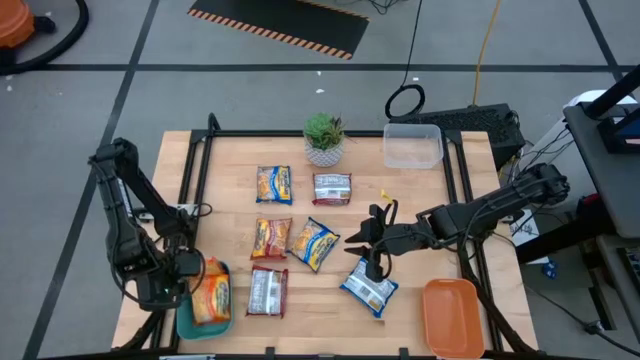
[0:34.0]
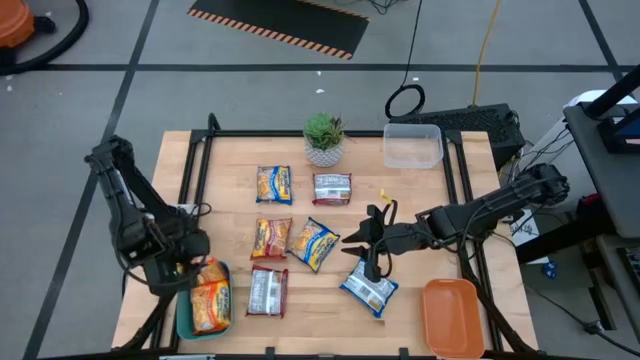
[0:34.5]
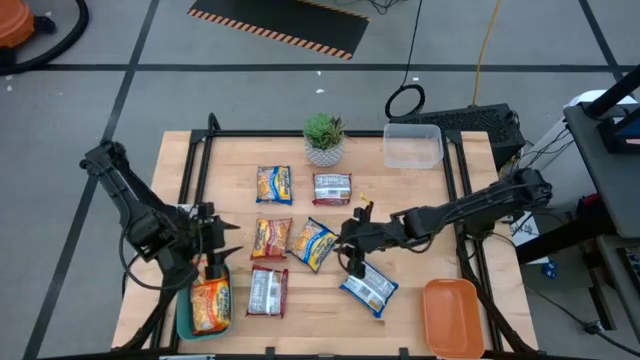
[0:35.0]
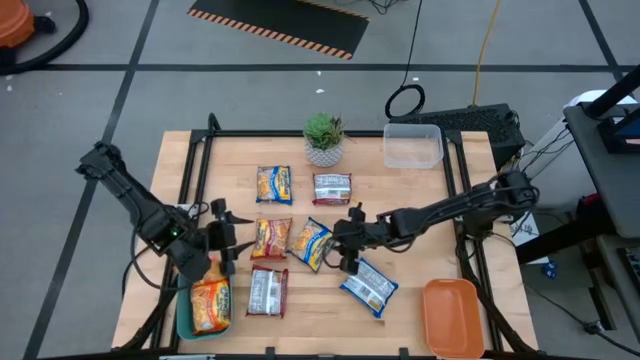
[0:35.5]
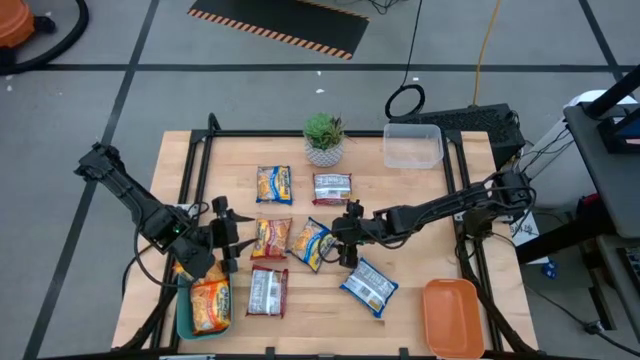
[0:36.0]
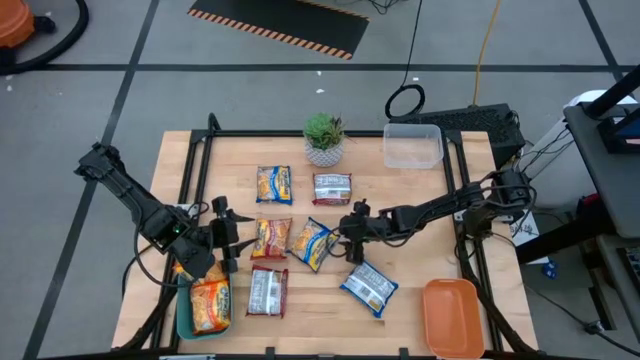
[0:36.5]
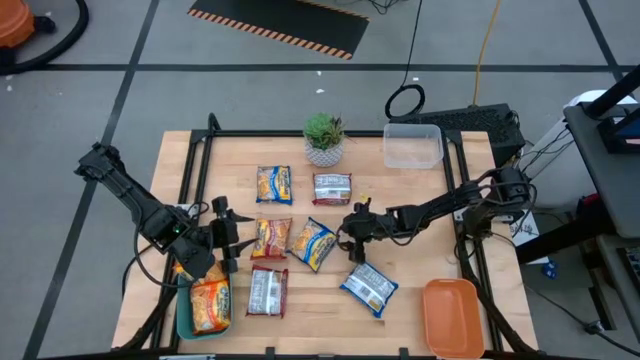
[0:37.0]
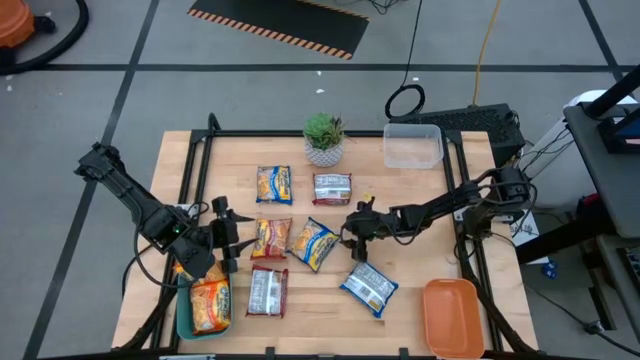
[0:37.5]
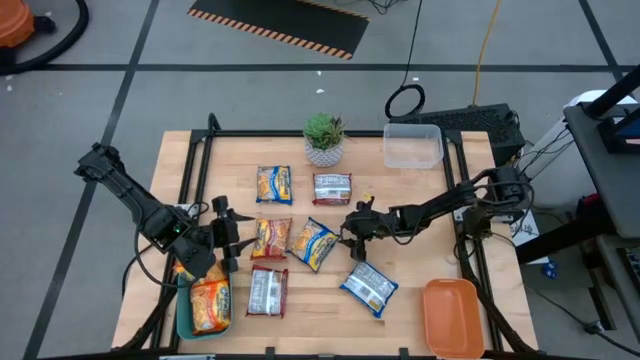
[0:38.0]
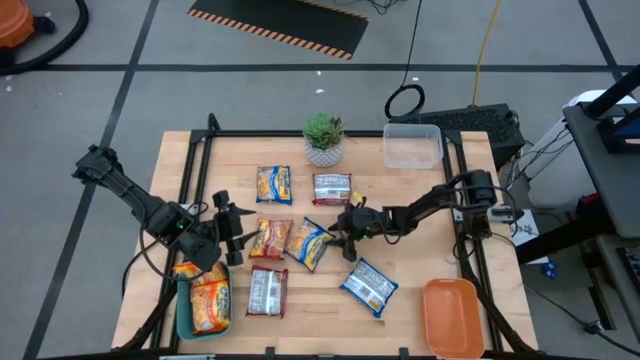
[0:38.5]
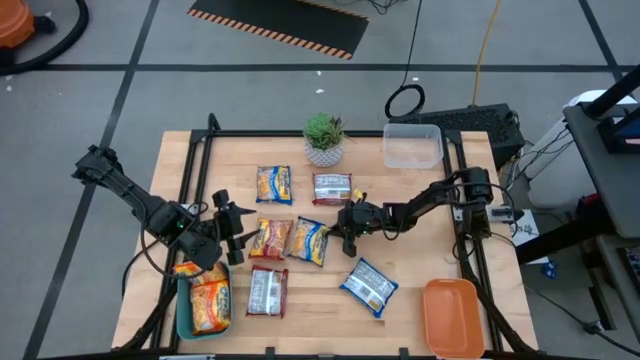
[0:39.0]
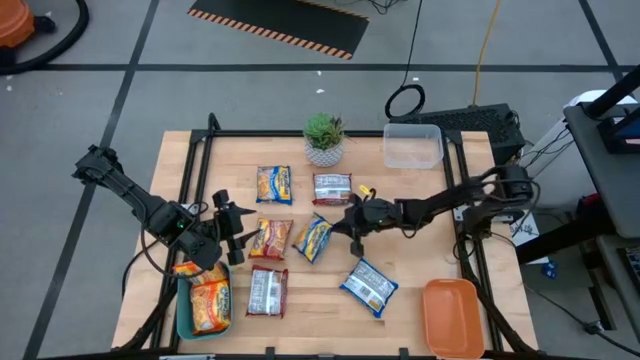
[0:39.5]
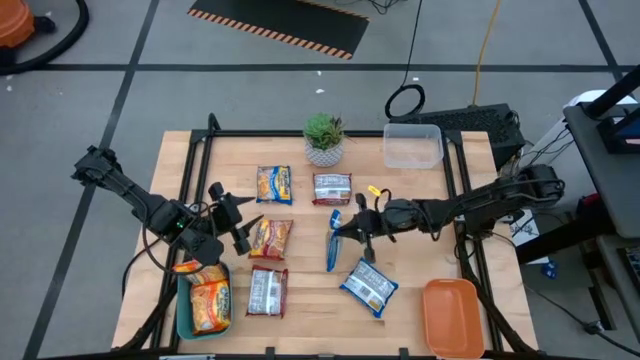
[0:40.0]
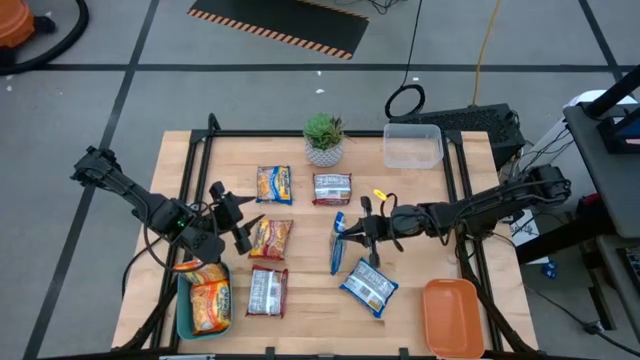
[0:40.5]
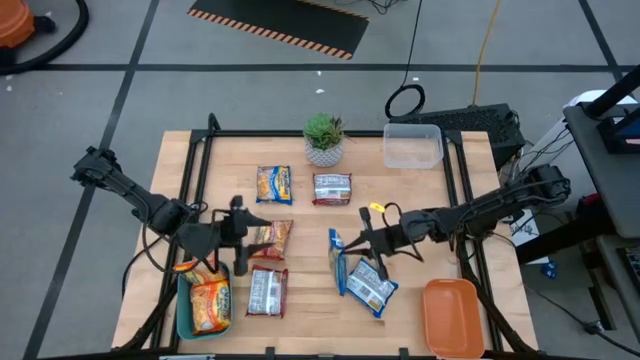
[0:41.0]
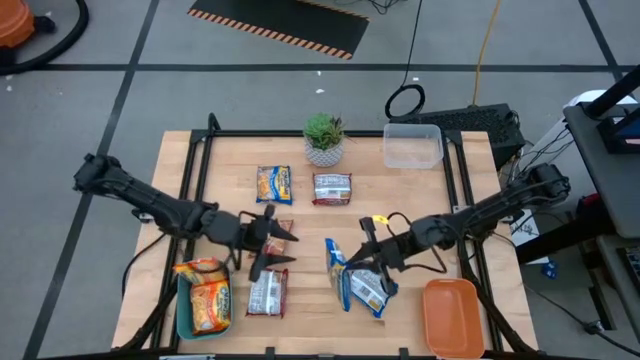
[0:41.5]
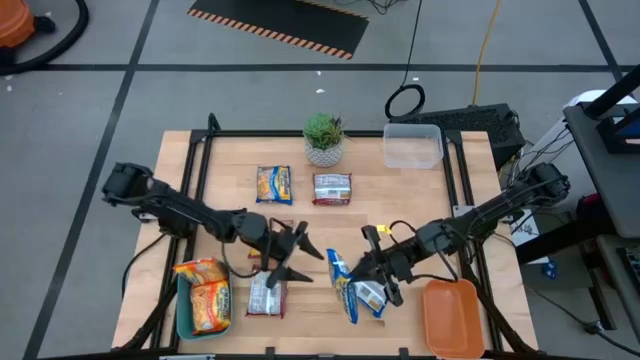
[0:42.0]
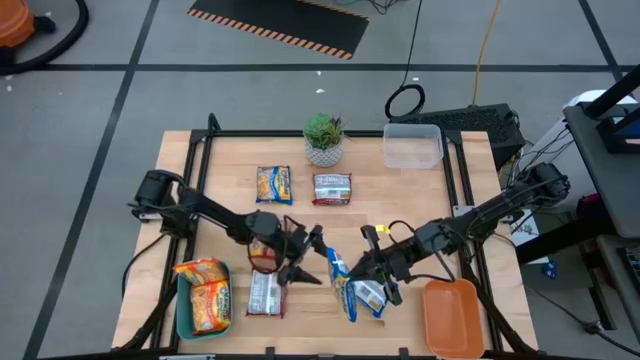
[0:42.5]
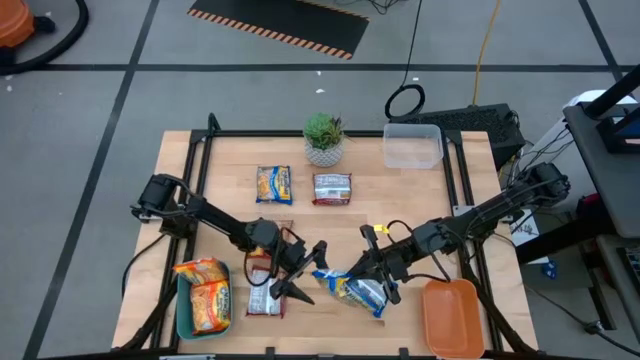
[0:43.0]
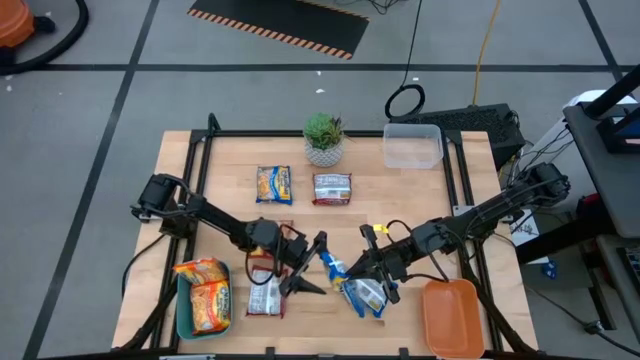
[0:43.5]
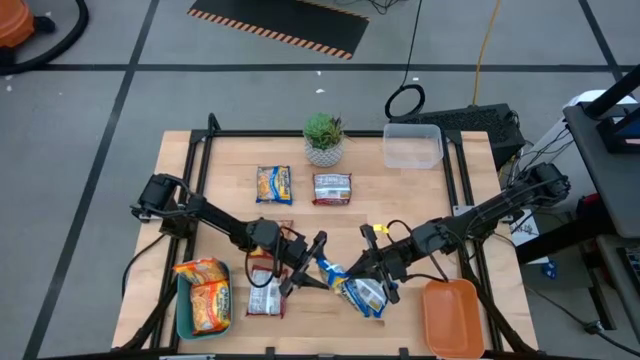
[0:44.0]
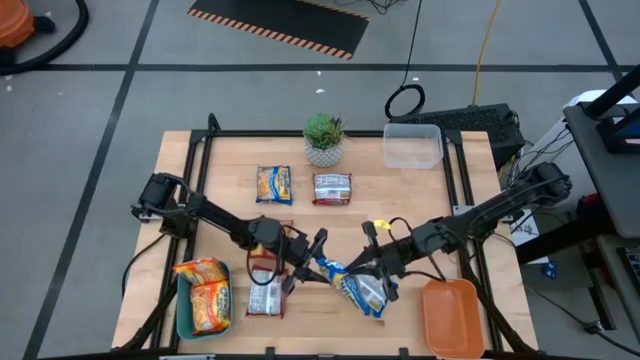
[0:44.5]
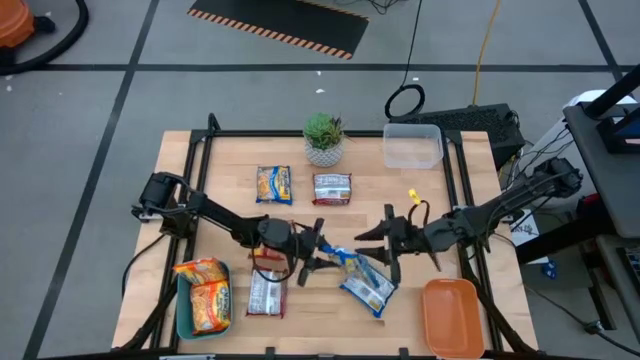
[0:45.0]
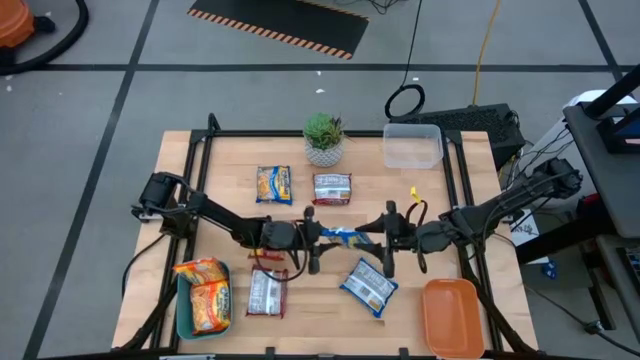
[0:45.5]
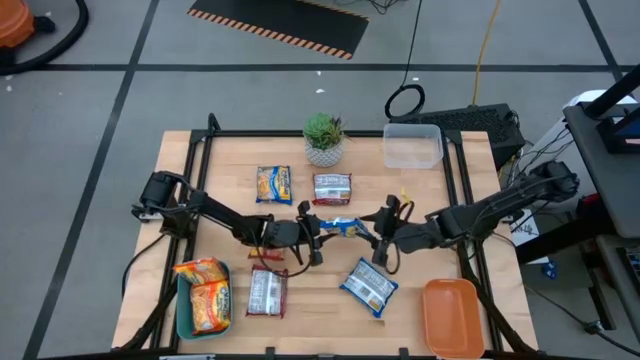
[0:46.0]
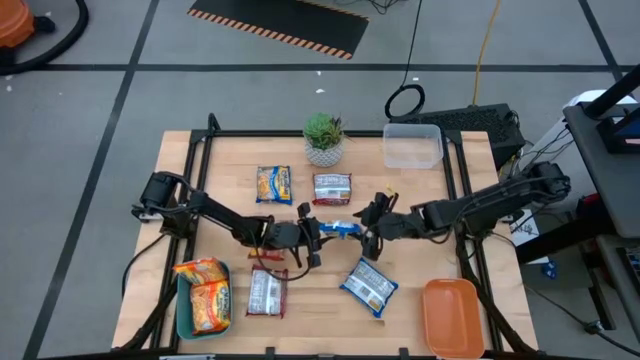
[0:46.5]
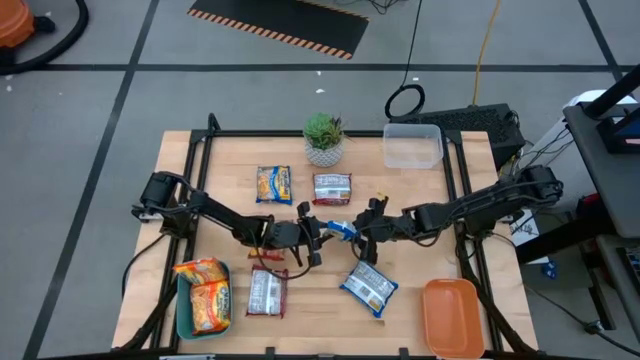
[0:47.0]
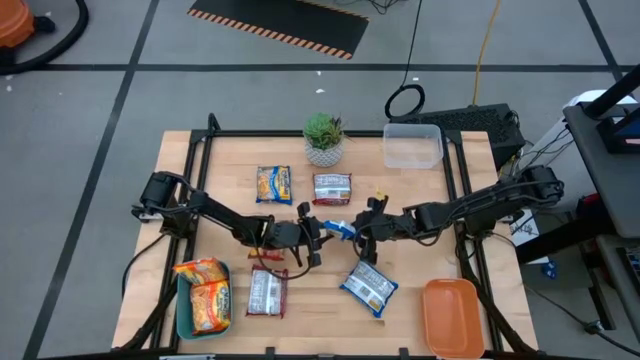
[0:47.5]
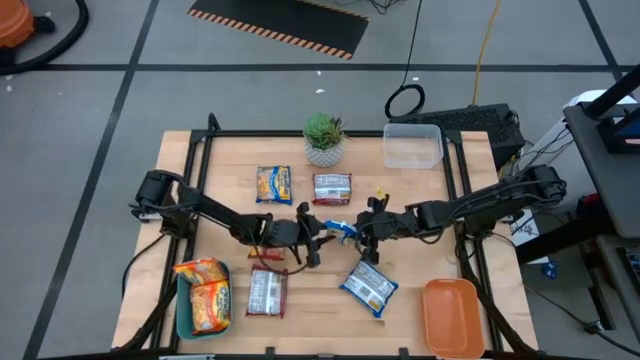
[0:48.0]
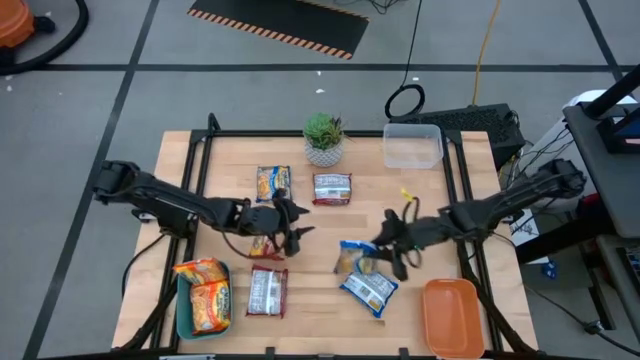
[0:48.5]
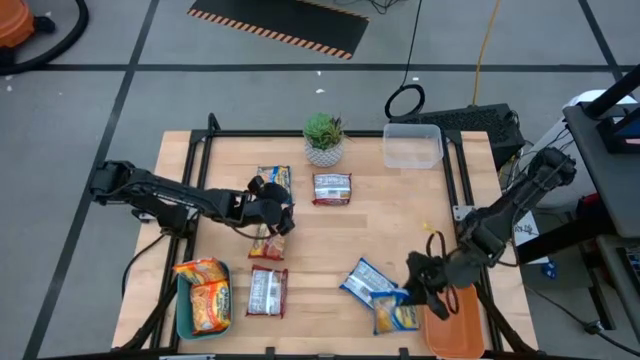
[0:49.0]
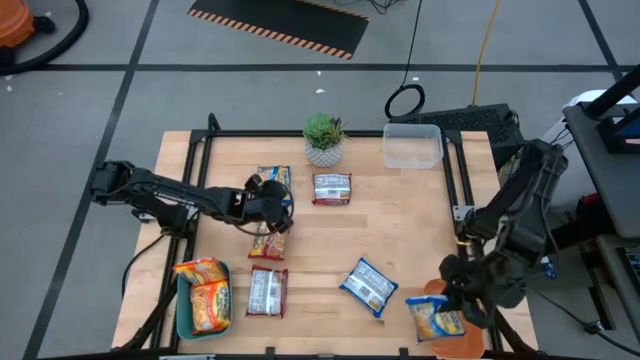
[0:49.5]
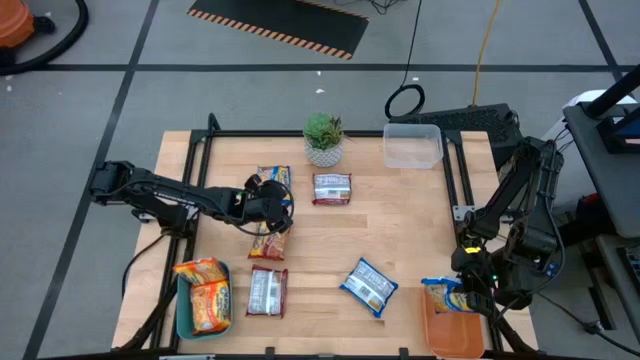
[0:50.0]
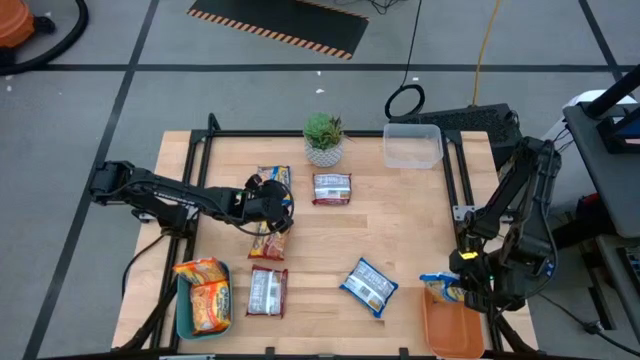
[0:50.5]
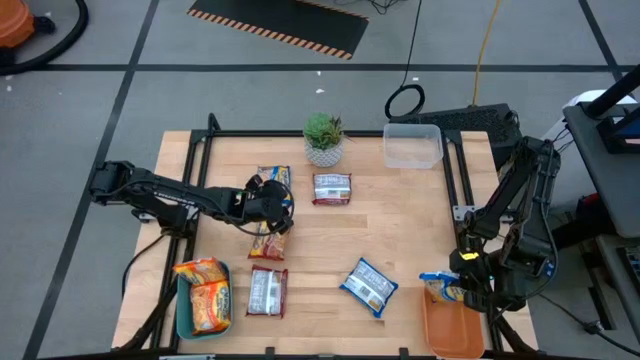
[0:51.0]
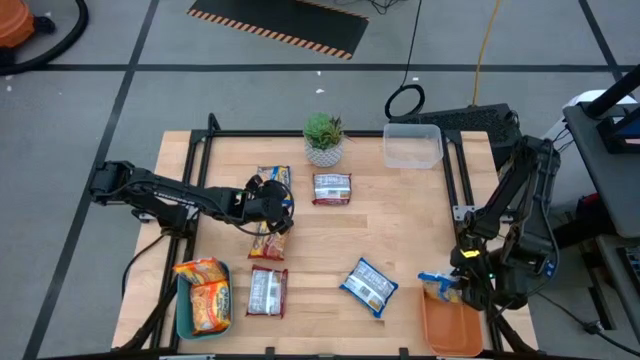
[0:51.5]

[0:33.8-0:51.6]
Task: Sort Maruchan noodles
Put the middle blue noodle pack into the orange bin

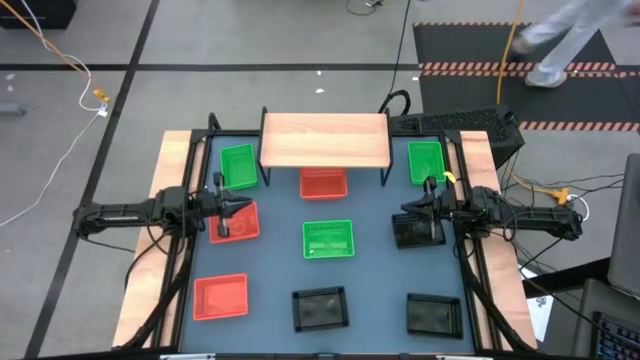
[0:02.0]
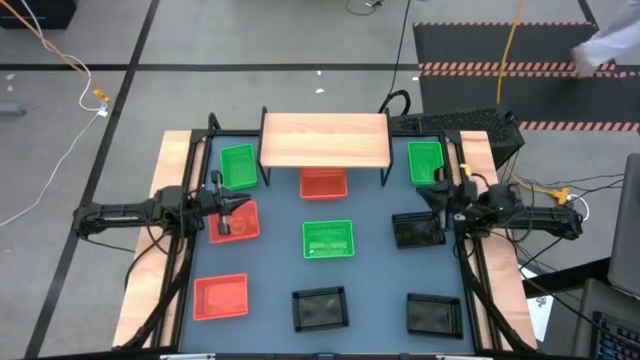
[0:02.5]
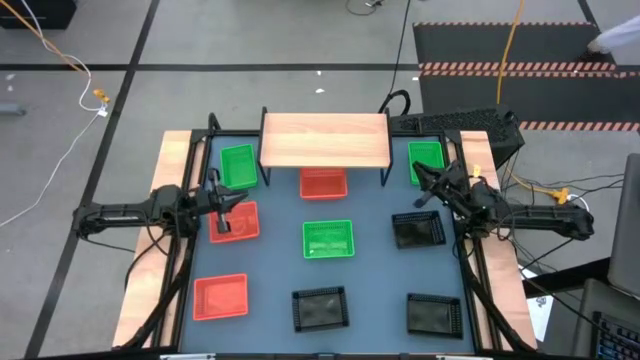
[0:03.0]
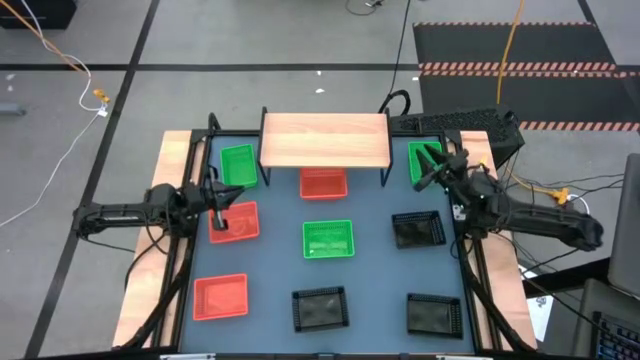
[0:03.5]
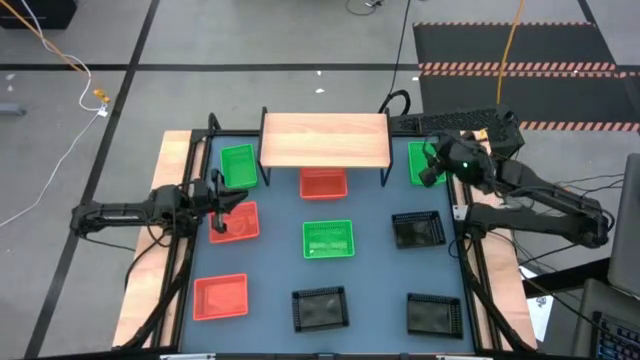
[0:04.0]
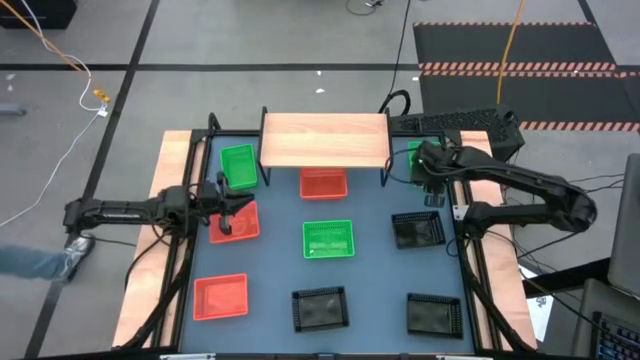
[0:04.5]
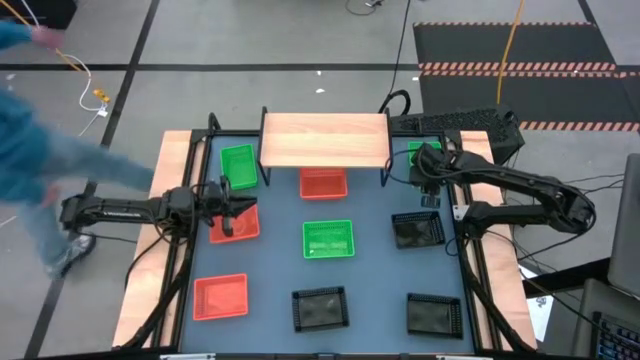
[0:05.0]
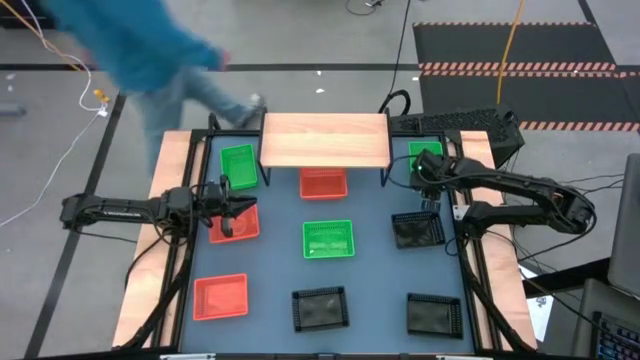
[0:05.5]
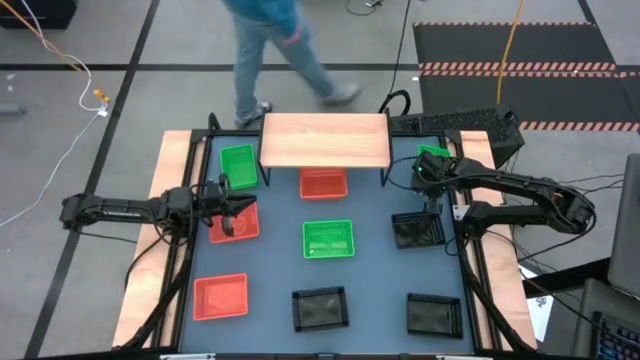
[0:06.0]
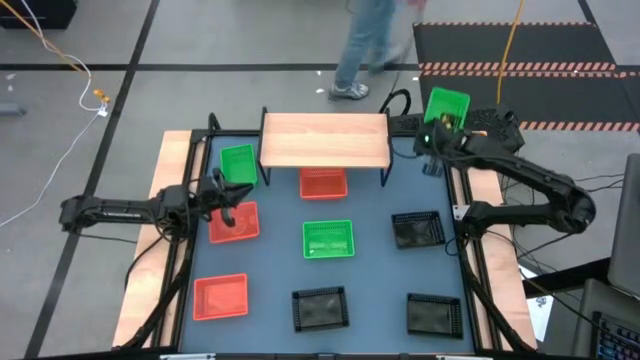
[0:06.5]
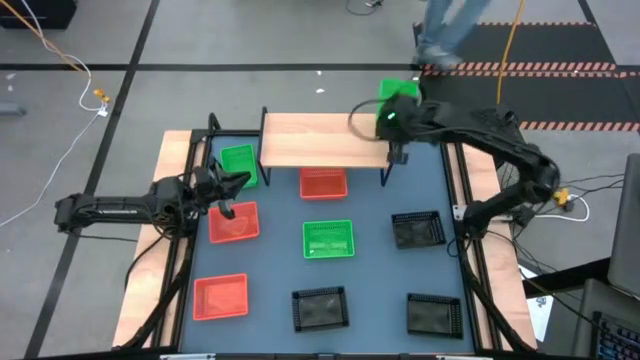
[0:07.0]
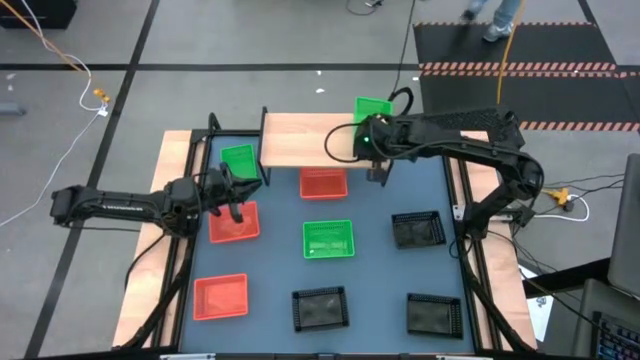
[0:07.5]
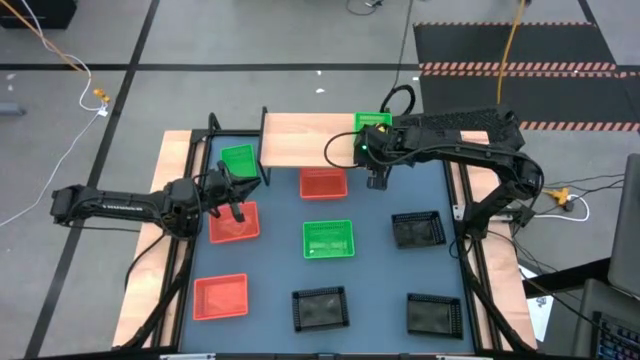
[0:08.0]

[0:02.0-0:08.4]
Task: Stack baskets on shelf by color
Put the top right green bin on the shelf
